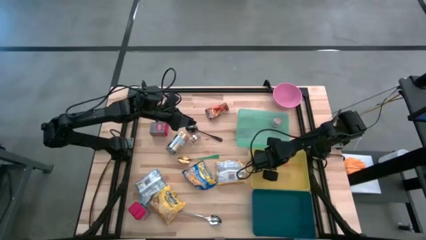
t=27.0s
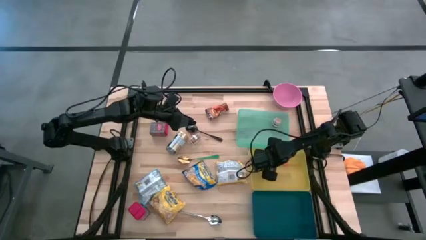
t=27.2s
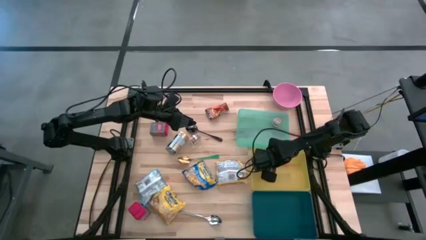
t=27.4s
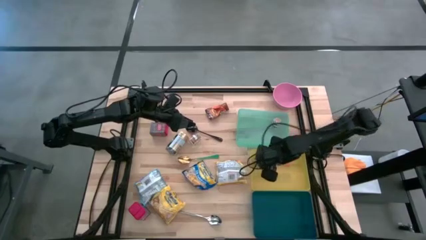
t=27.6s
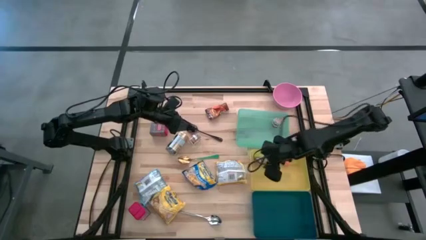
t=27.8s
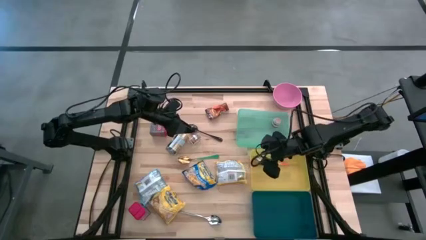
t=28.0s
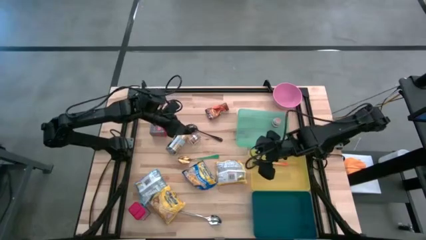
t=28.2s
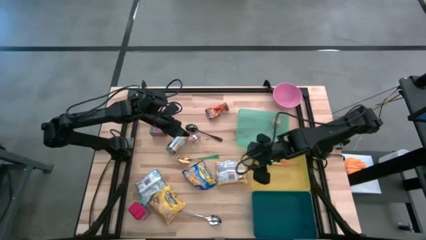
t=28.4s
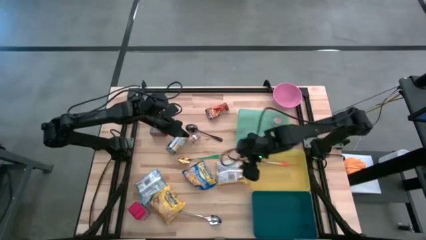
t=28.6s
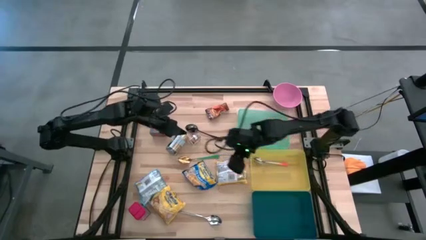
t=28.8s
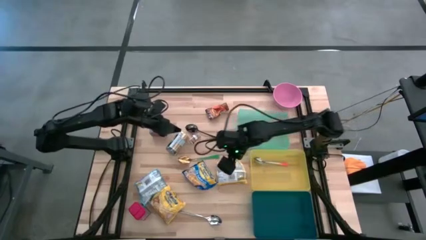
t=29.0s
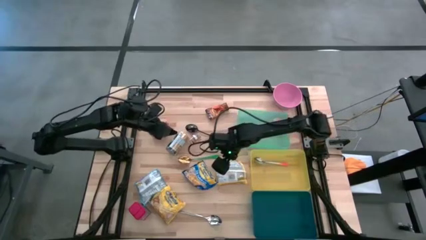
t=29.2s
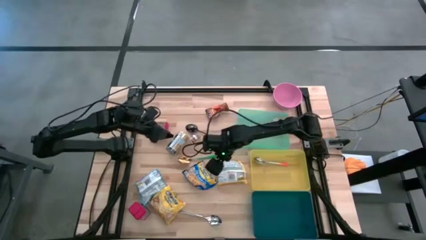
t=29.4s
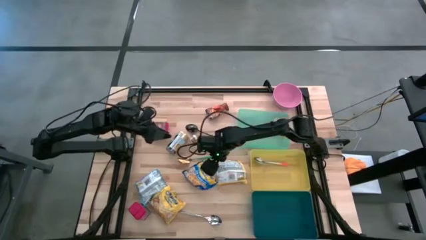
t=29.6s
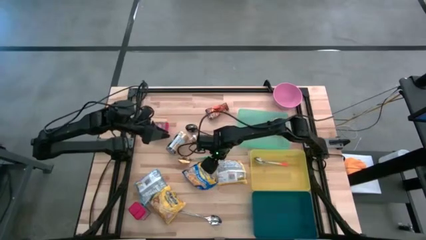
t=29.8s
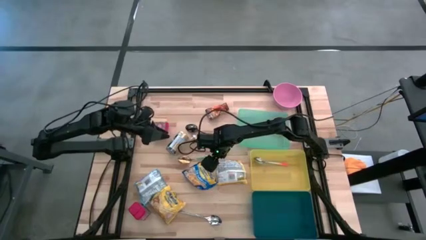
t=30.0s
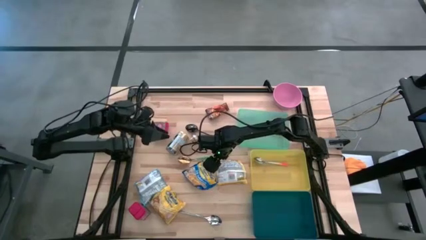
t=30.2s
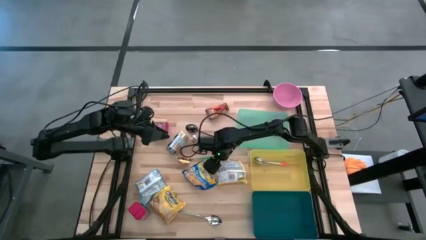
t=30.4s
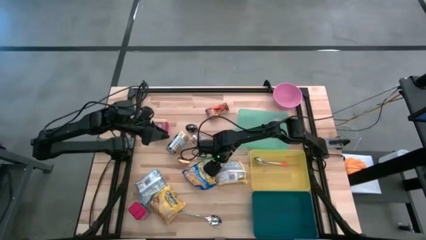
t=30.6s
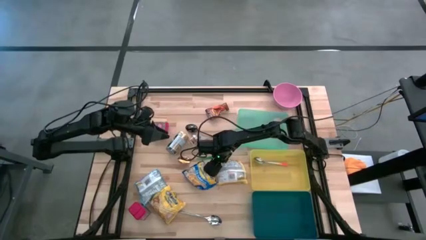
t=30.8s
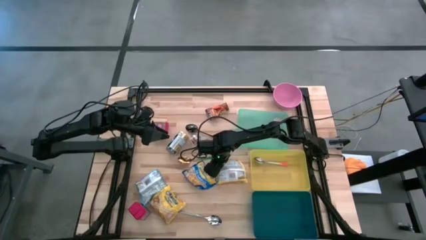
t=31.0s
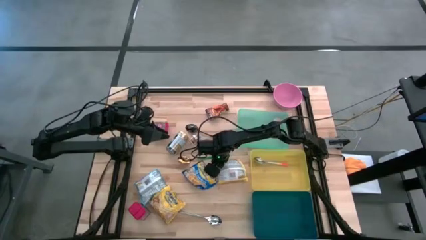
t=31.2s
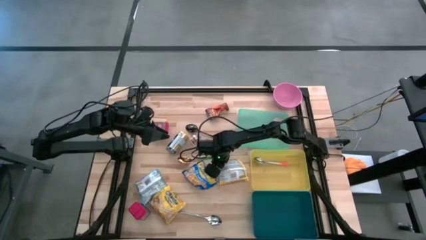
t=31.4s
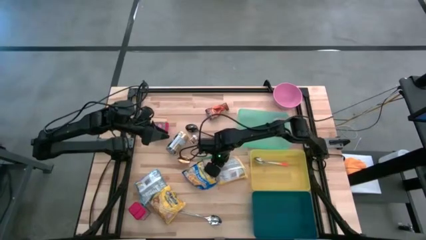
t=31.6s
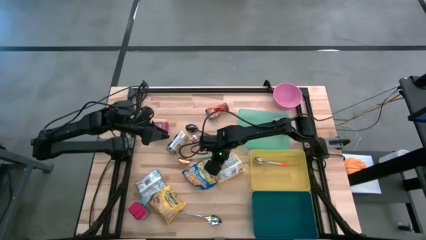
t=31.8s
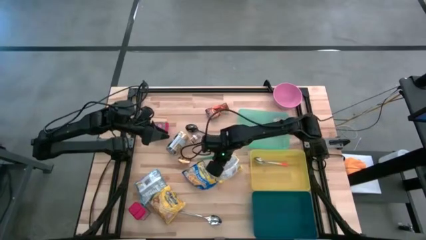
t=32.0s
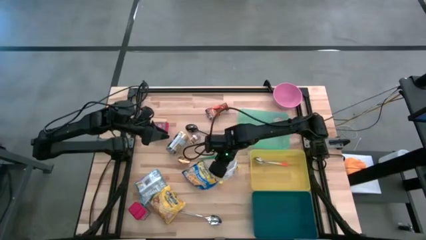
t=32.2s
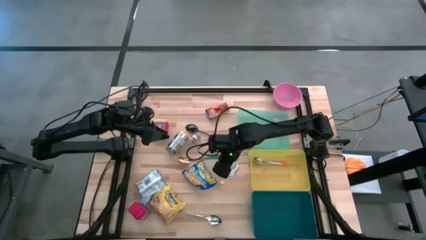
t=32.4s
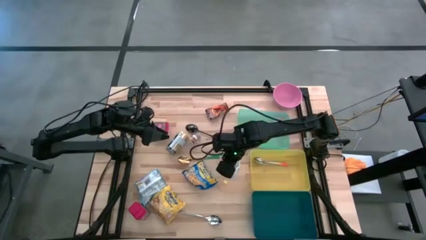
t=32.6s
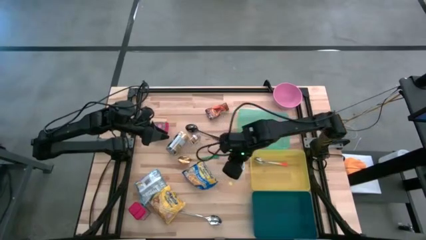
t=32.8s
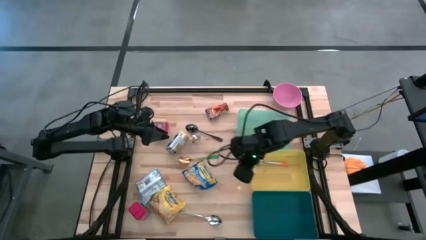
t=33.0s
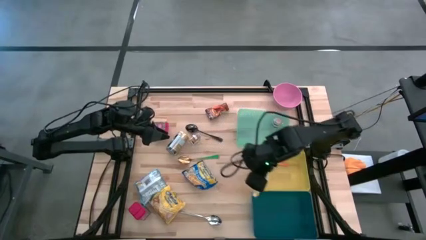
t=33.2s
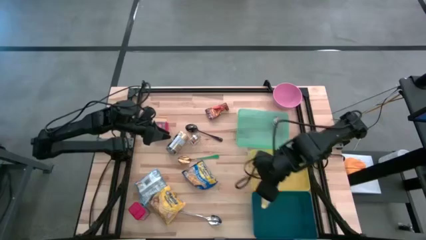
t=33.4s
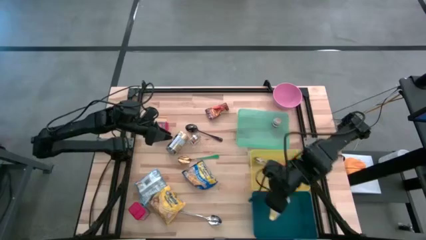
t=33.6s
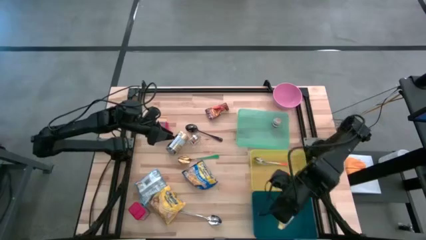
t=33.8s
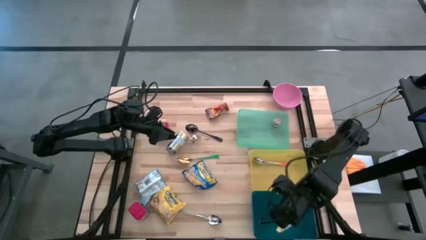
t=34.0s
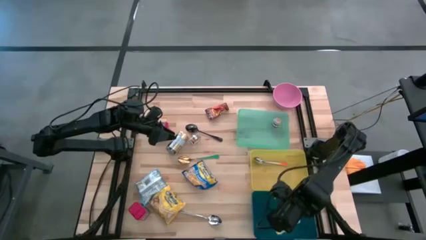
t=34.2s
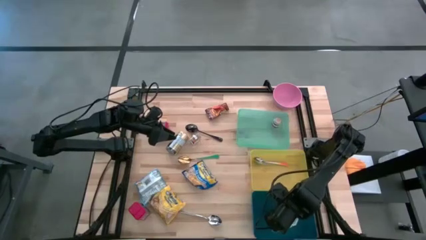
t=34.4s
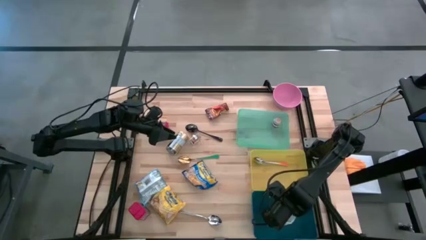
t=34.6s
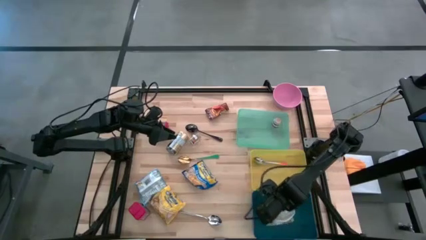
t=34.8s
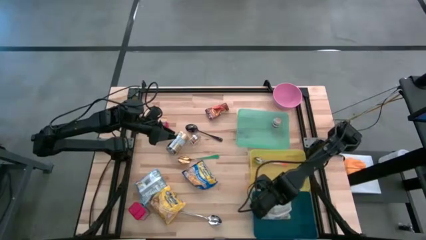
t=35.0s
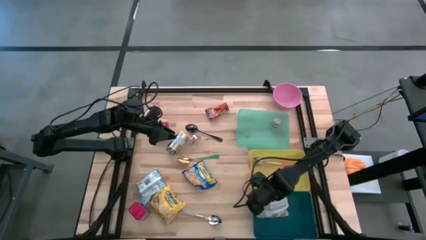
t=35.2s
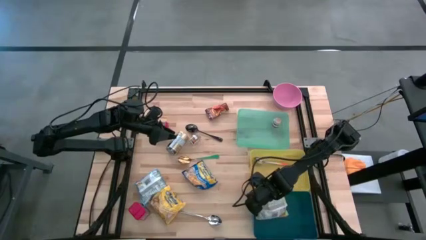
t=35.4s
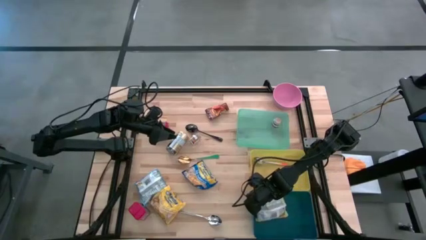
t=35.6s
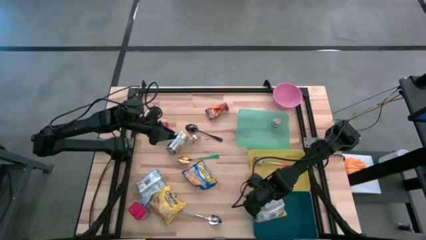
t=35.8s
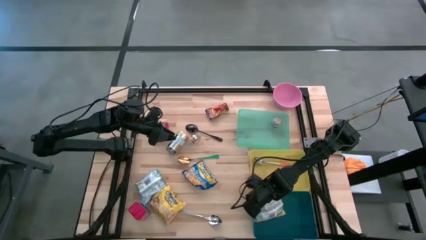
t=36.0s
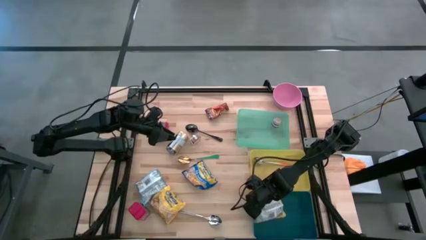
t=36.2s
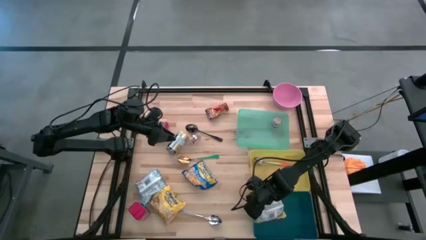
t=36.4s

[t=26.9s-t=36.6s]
Put the right yellow noodle pack into the blue bin
